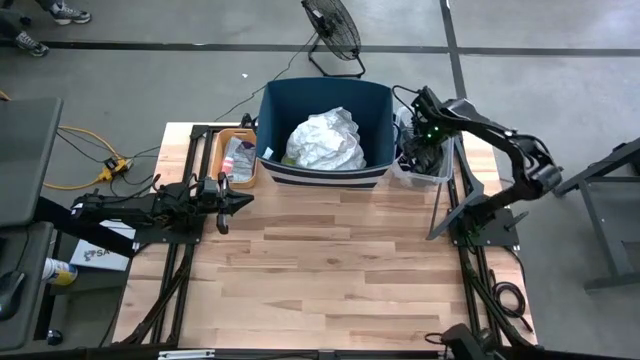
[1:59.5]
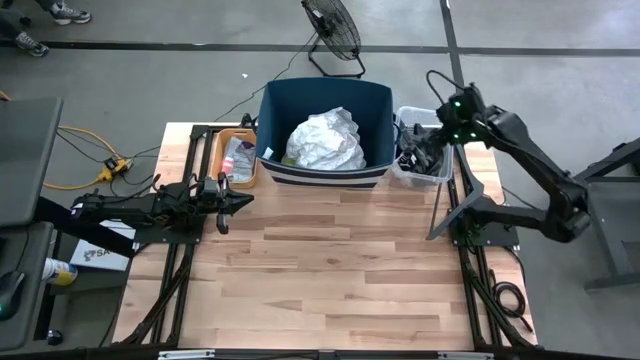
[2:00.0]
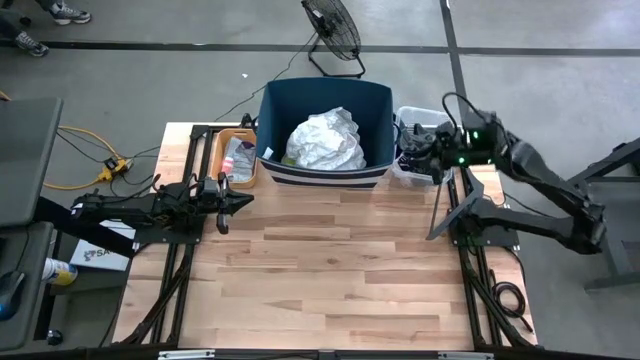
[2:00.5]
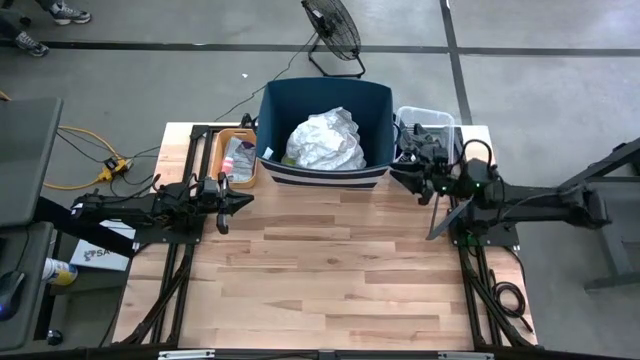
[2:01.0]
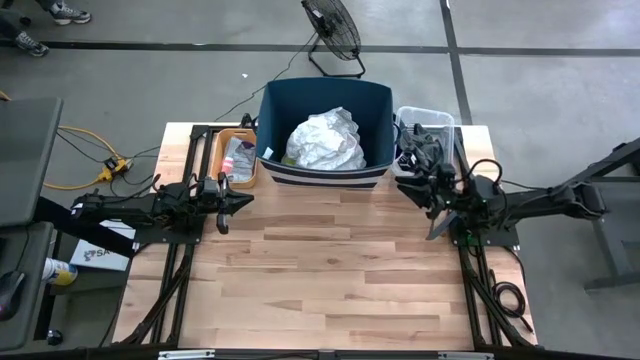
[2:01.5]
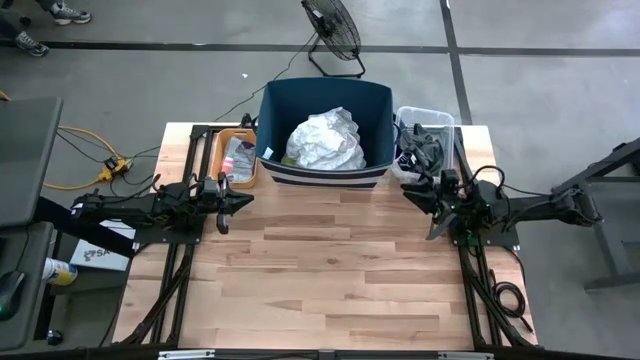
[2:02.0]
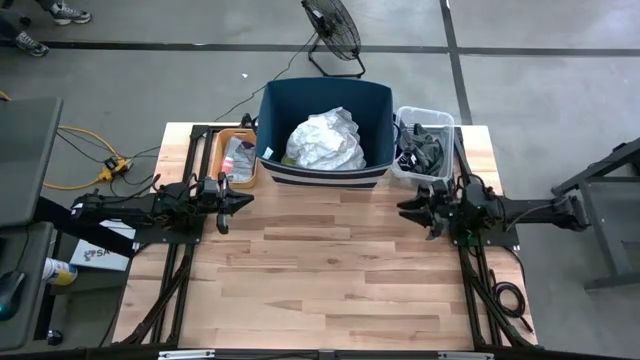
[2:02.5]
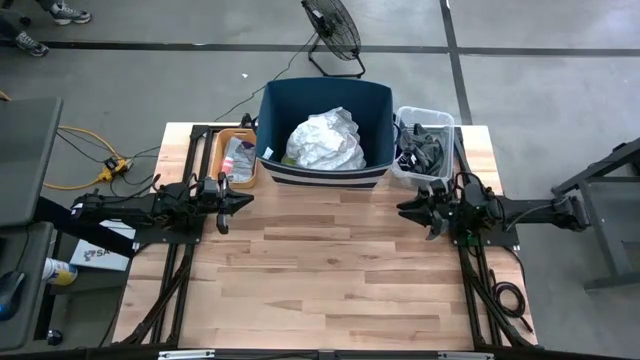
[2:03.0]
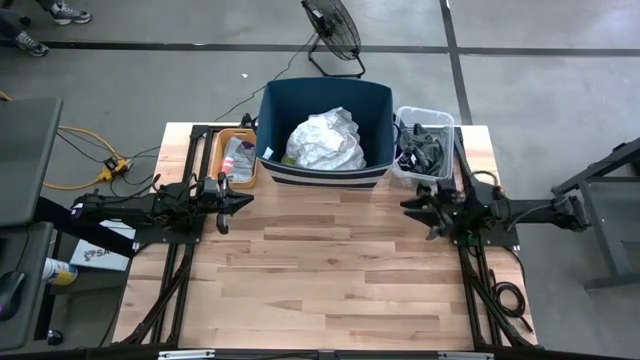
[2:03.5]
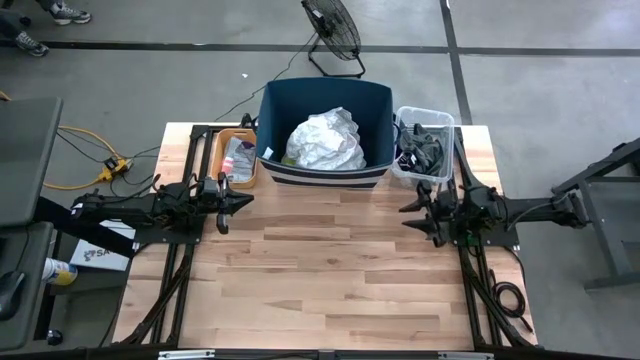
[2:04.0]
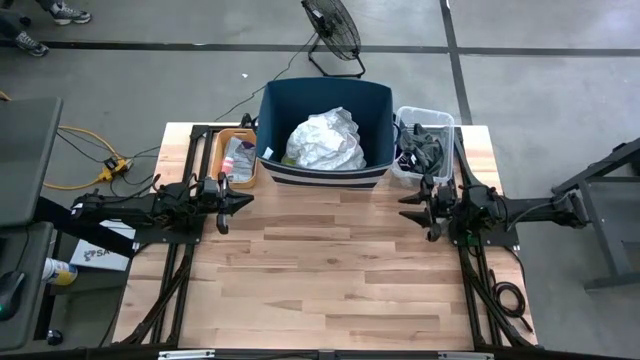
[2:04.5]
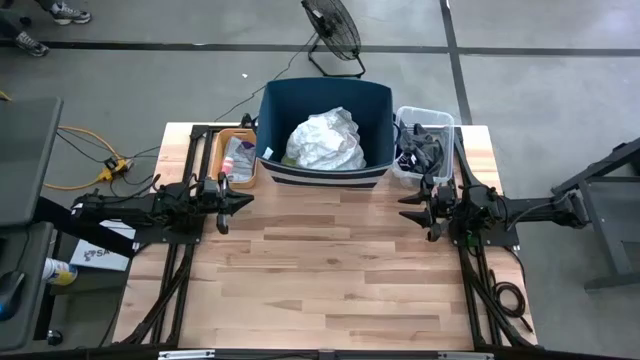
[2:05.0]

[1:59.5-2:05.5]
Task: Pick & Place Cloths
Return to Home Position

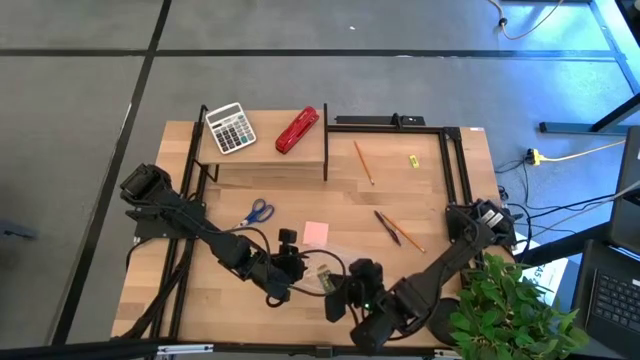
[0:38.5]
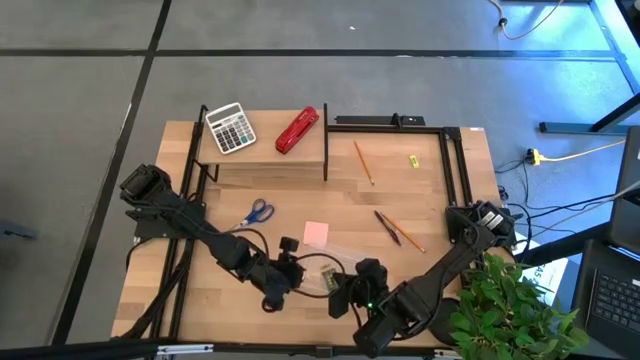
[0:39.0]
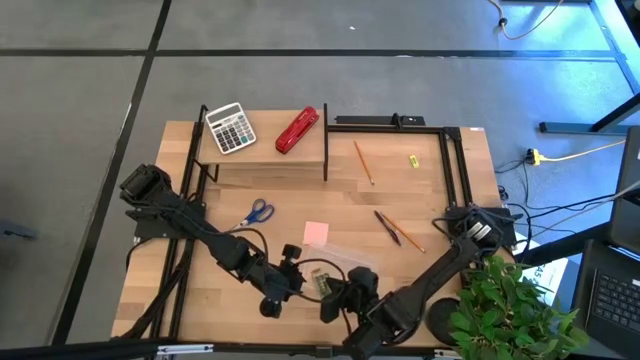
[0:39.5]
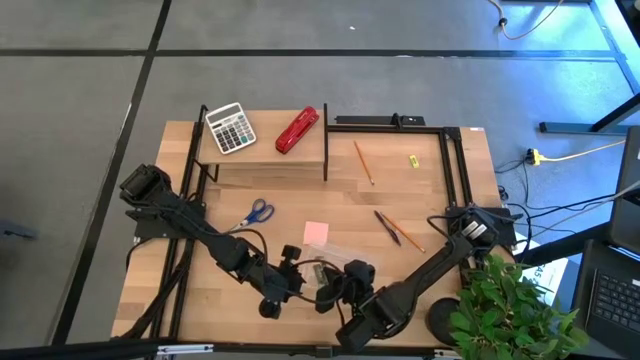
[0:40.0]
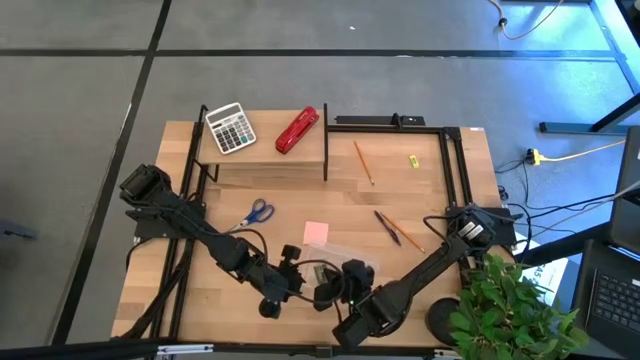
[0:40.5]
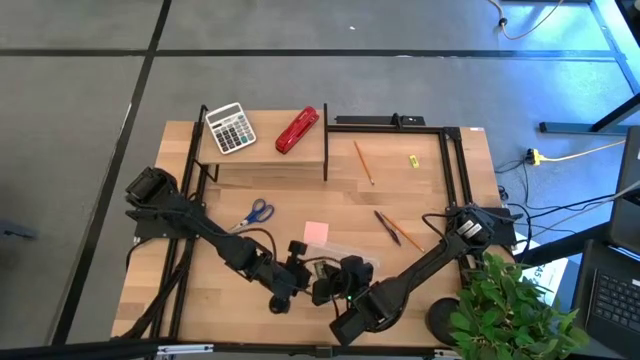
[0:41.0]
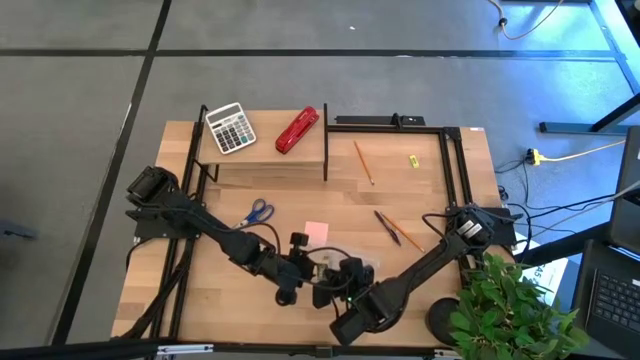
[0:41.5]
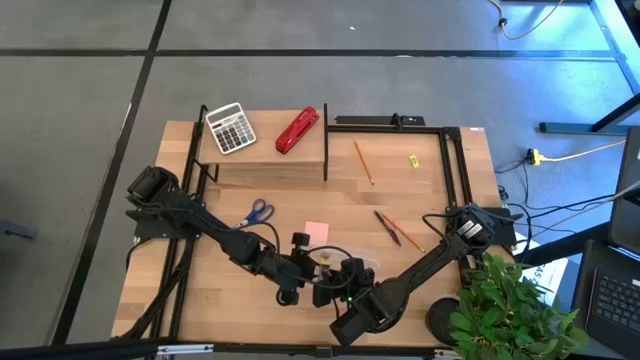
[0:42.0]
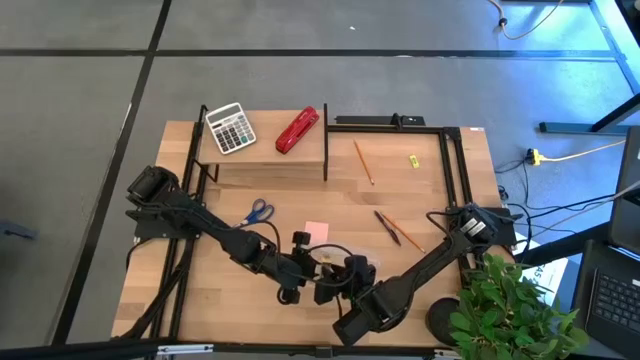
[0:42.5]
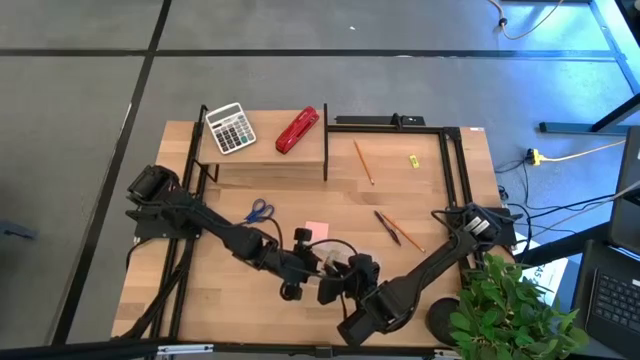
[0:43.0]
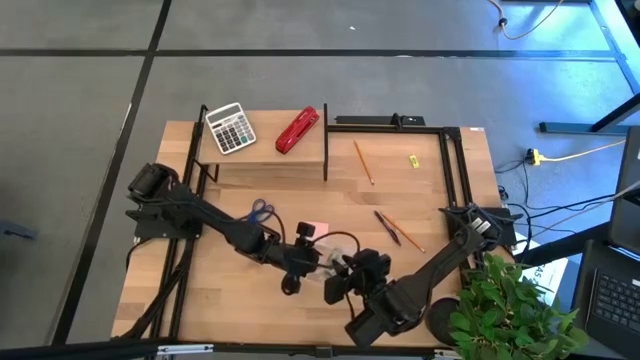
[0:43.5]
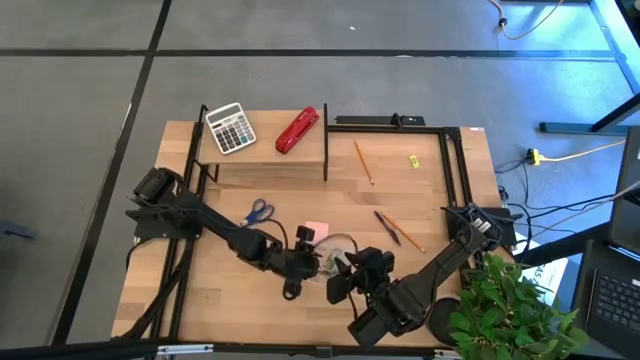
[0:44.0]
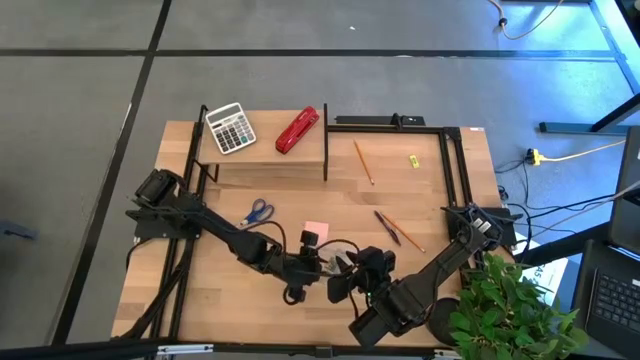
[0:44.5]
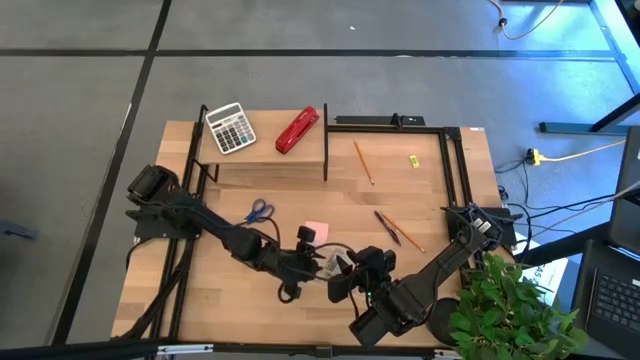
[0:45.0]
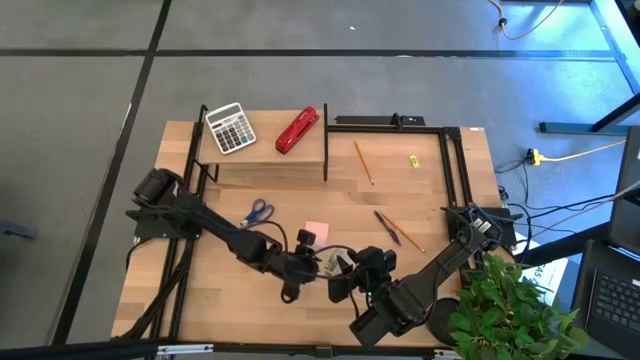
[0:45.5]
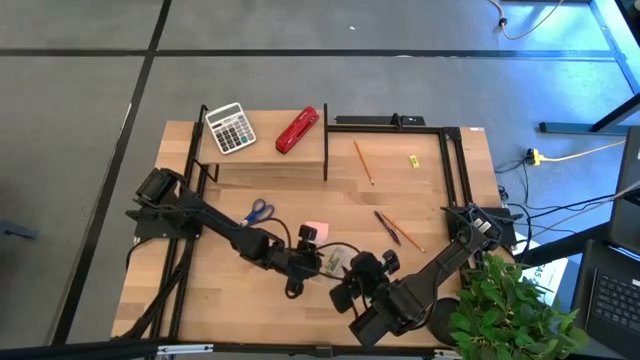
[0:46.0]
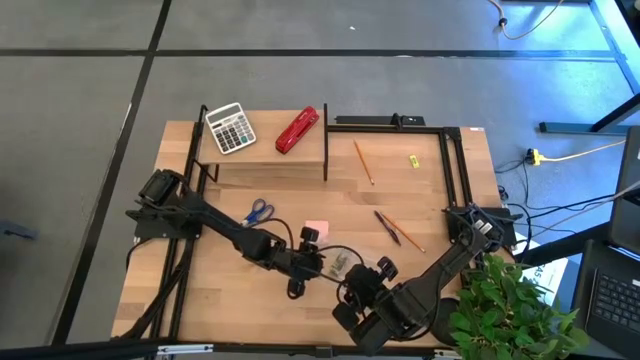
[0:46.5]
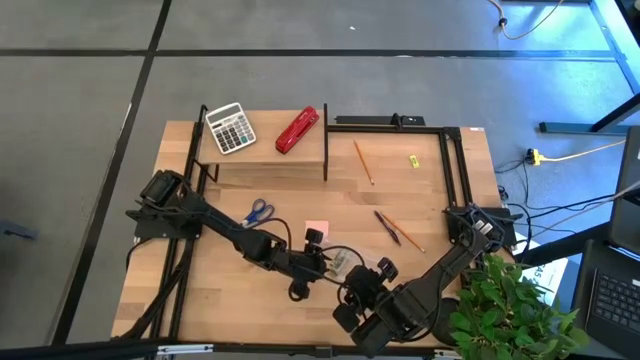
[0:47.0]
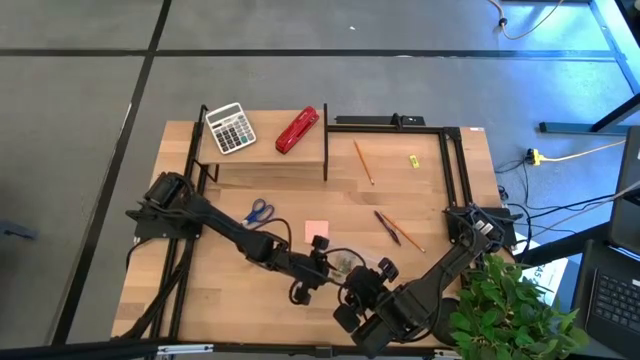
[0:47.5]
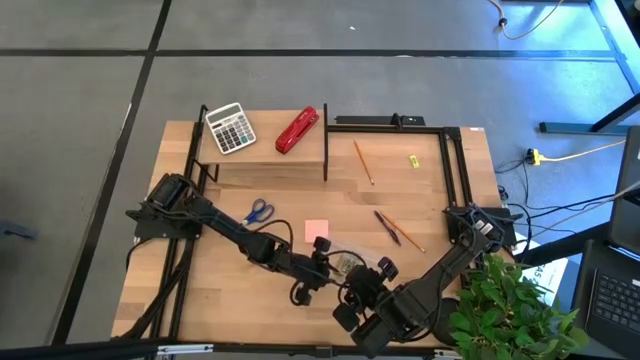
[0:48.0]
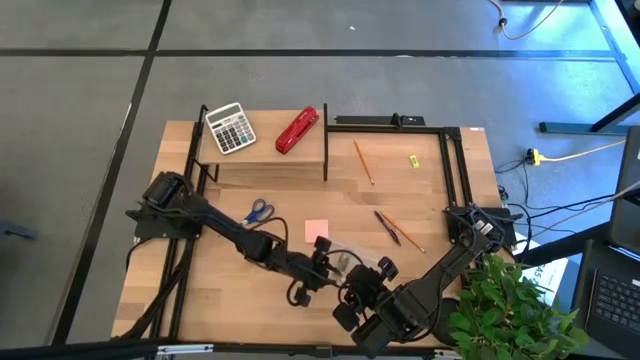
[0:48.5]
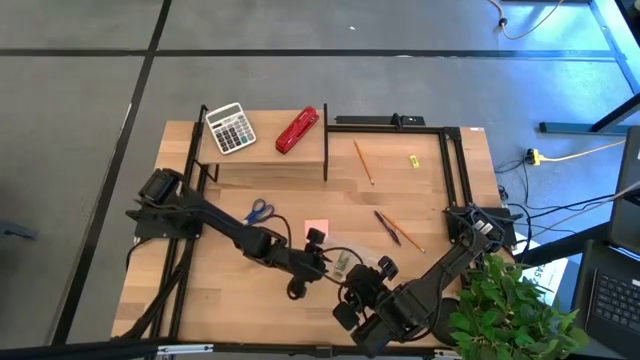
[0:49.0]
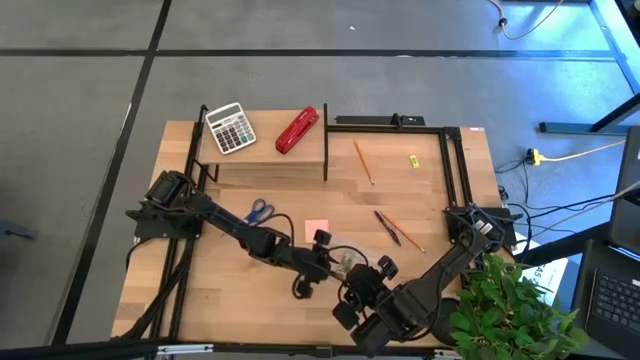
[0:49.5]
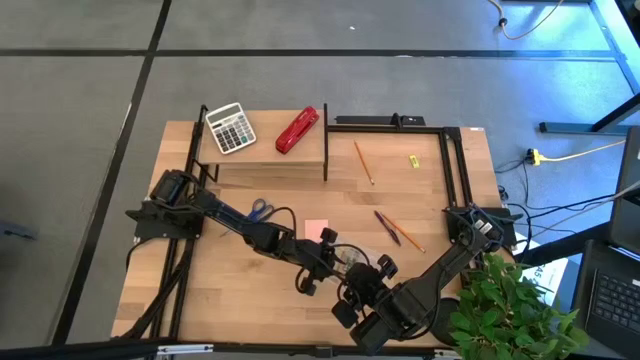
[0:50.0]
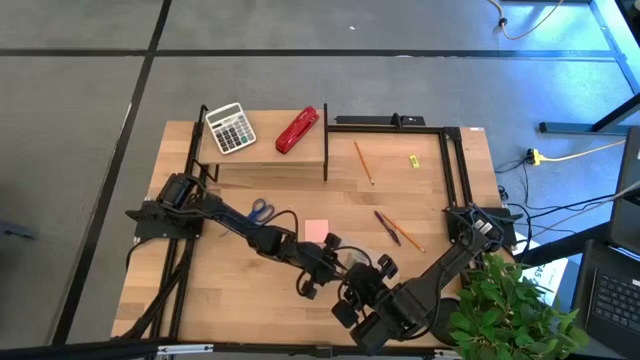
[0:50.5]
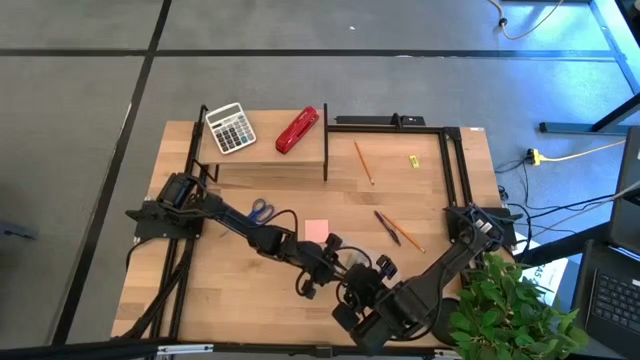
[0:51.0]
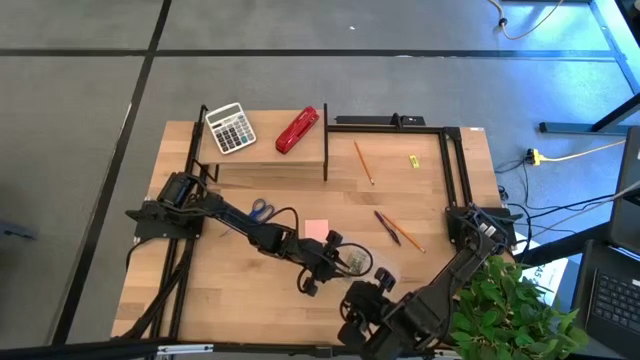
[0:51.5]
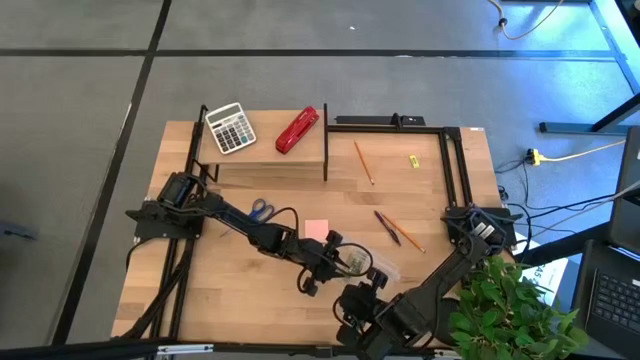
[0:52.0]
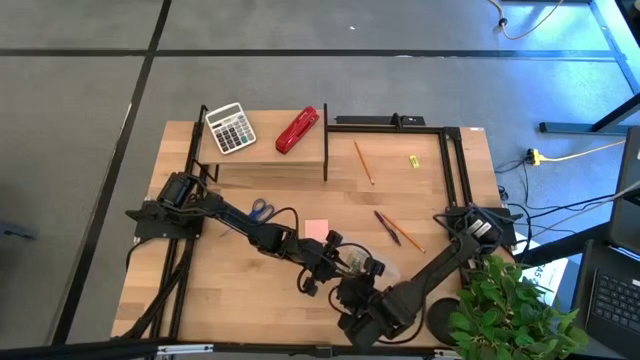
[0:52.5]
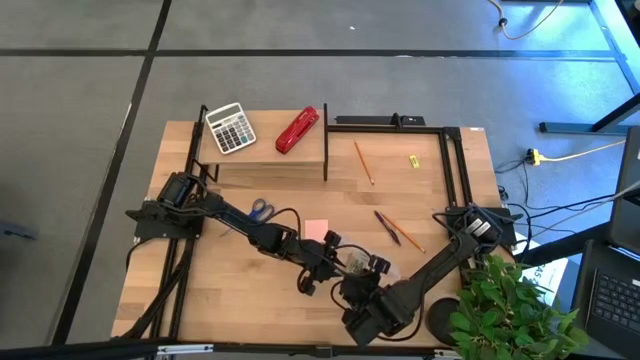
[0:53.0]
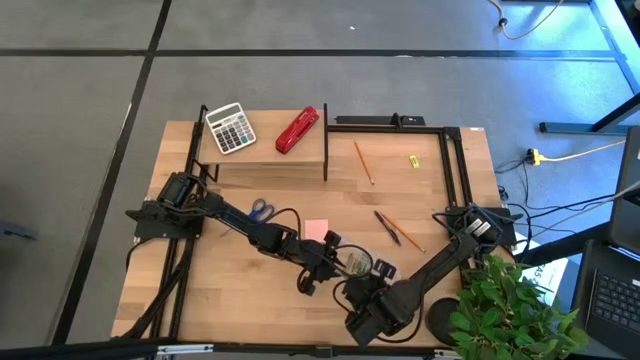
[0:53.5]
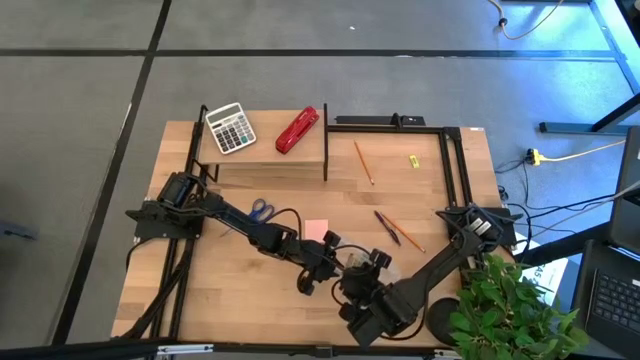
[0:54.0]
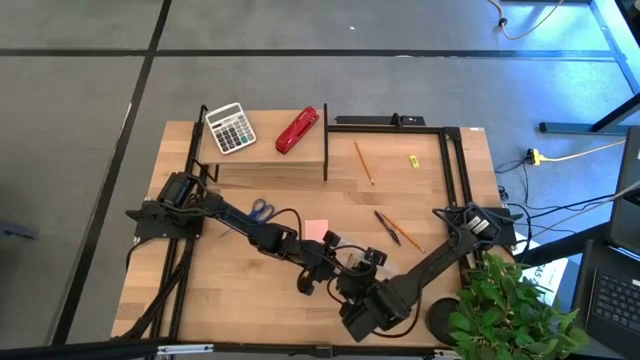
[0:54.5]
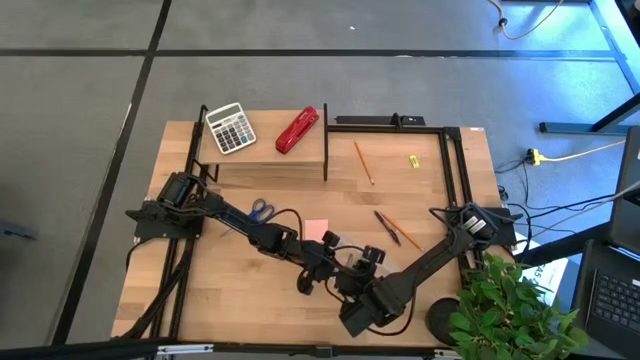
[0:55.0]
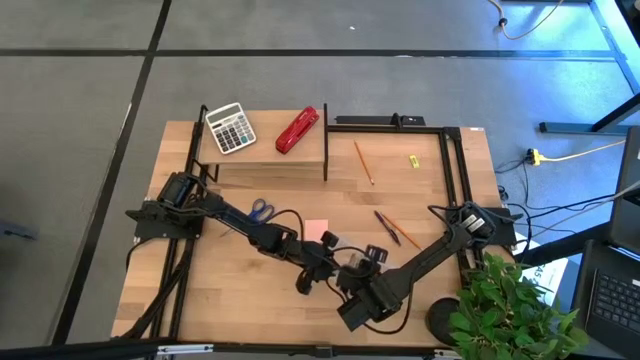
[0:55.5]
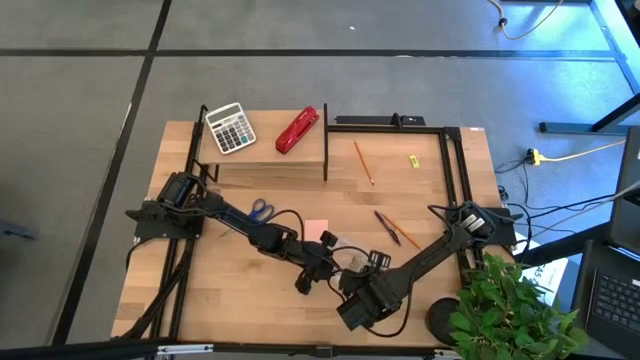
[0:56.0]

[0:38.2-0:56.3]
Task: Pack school essentials
Put the crayon box into the transparent supply box
